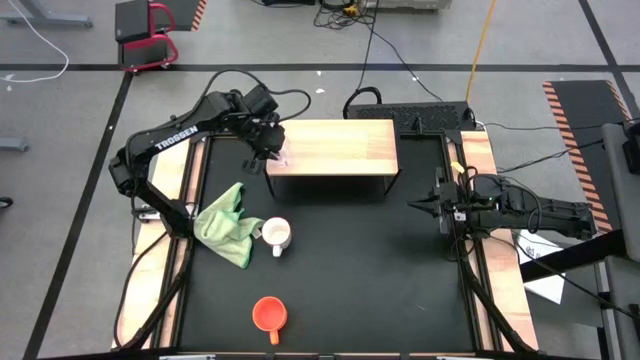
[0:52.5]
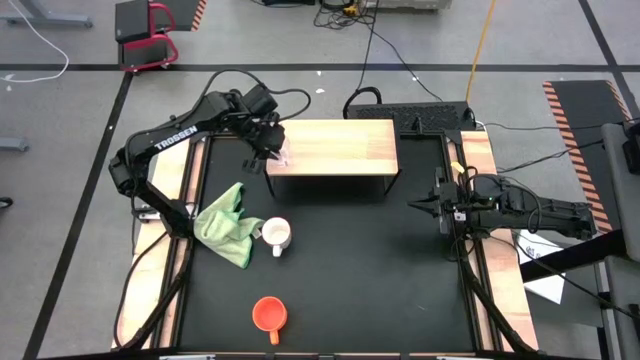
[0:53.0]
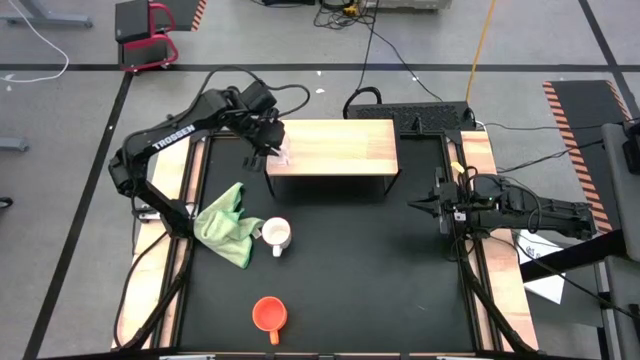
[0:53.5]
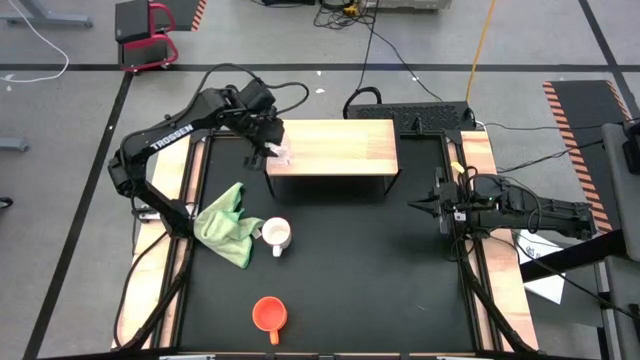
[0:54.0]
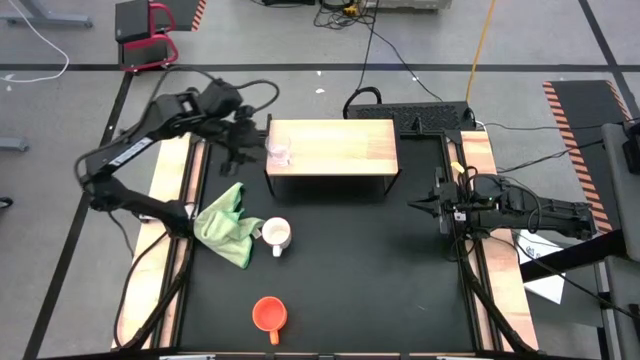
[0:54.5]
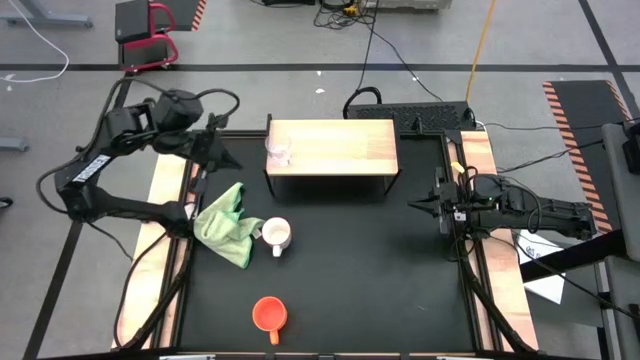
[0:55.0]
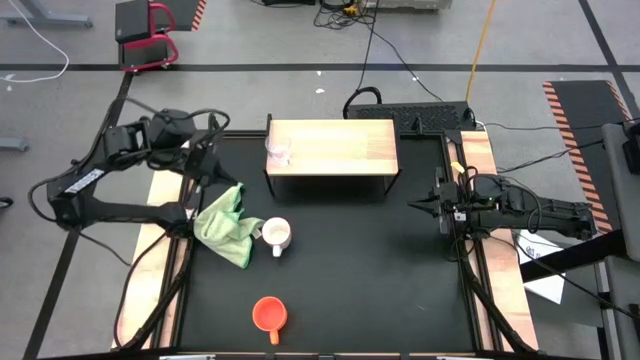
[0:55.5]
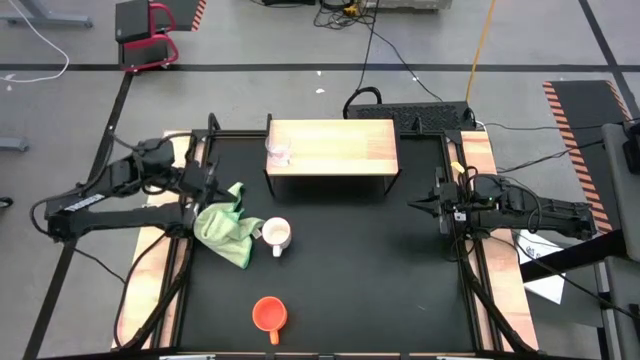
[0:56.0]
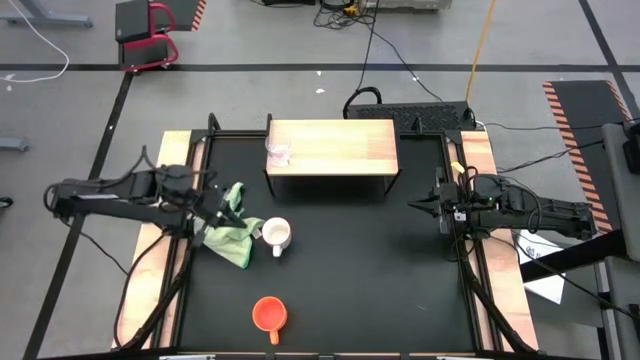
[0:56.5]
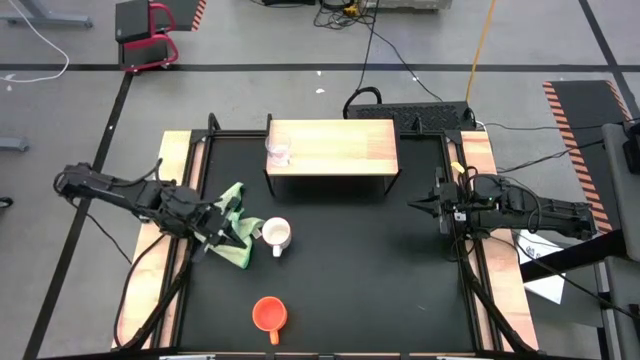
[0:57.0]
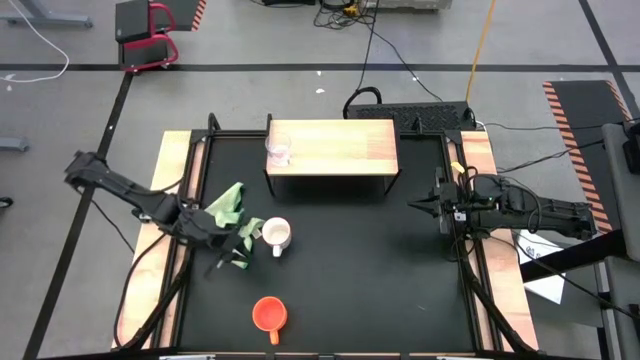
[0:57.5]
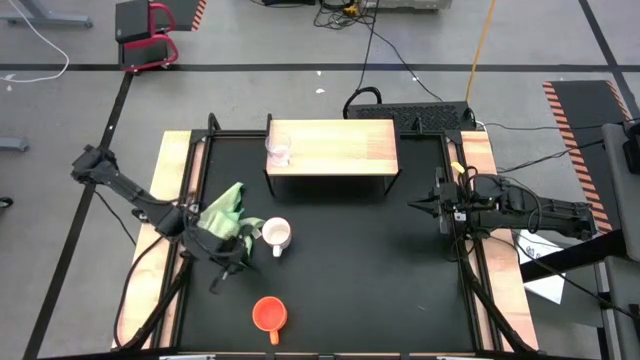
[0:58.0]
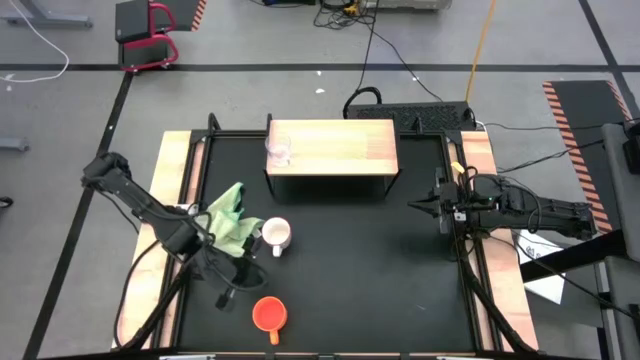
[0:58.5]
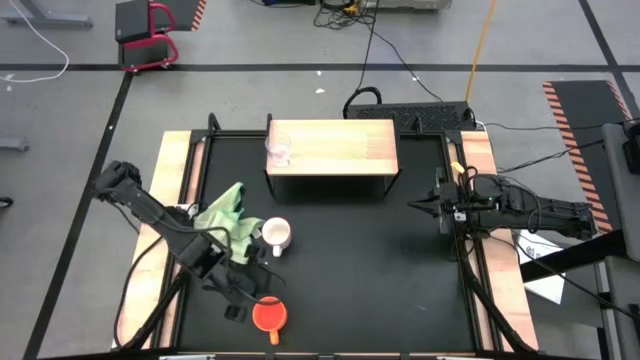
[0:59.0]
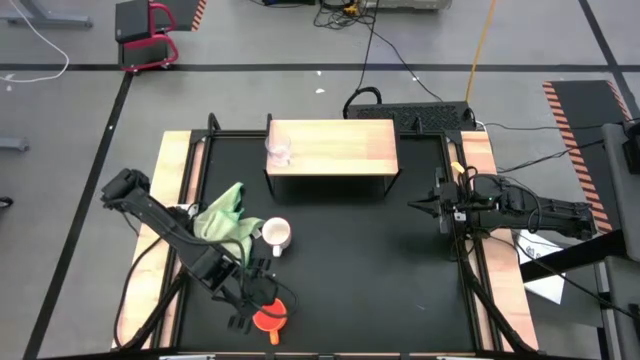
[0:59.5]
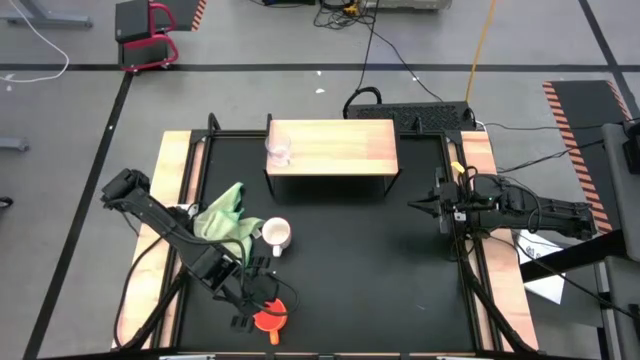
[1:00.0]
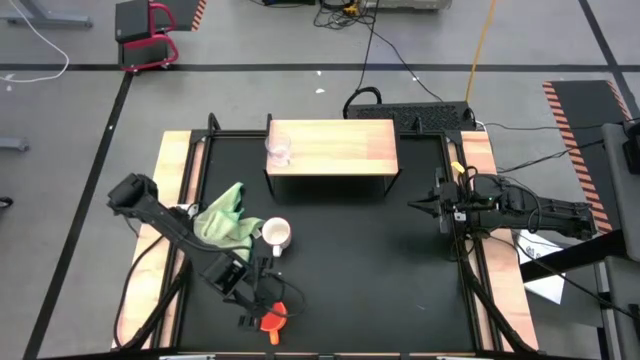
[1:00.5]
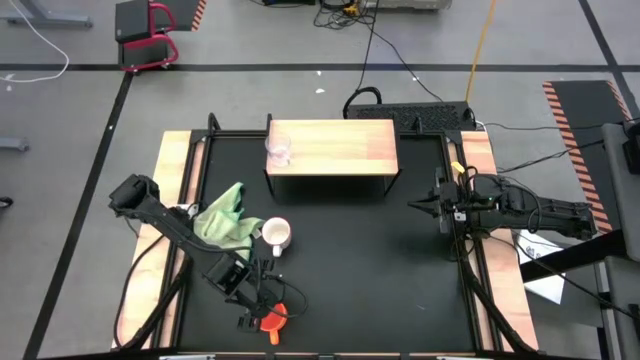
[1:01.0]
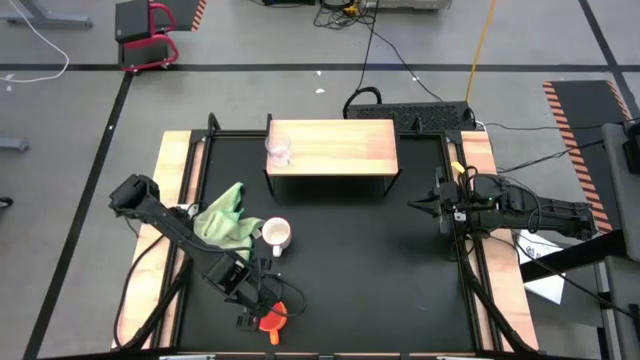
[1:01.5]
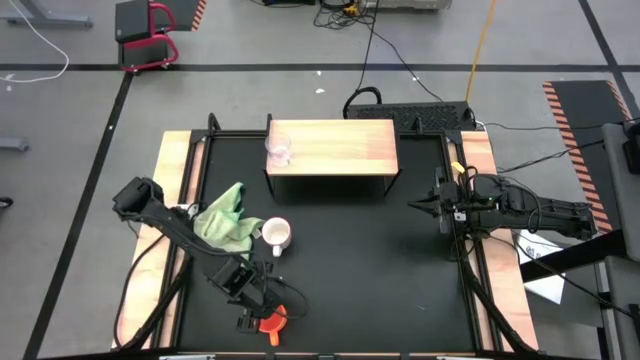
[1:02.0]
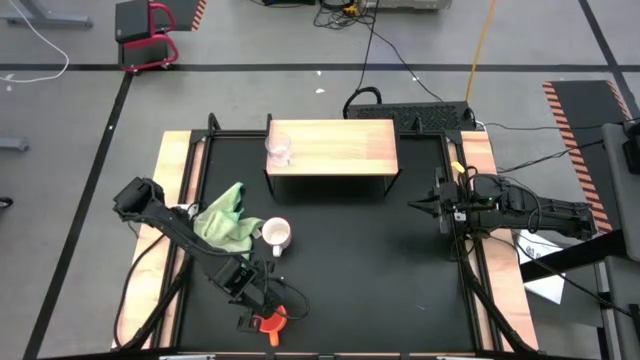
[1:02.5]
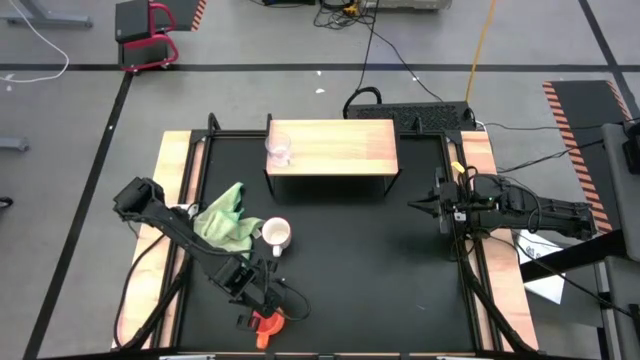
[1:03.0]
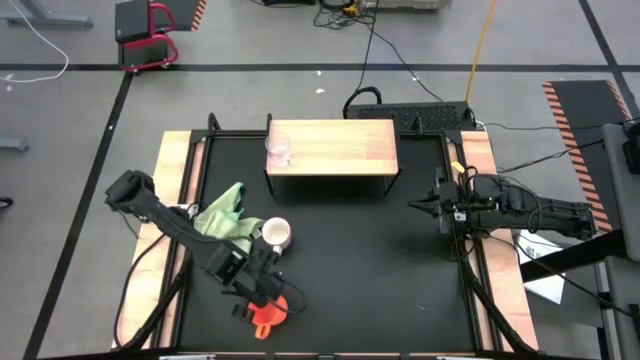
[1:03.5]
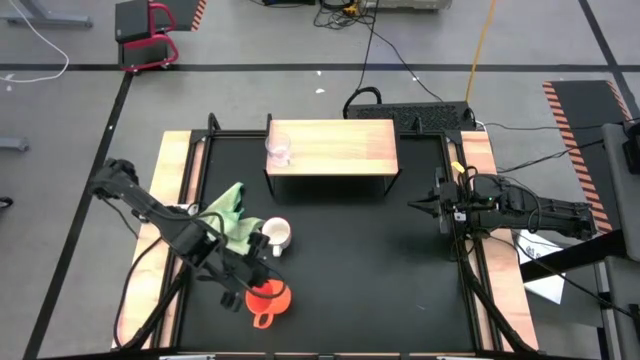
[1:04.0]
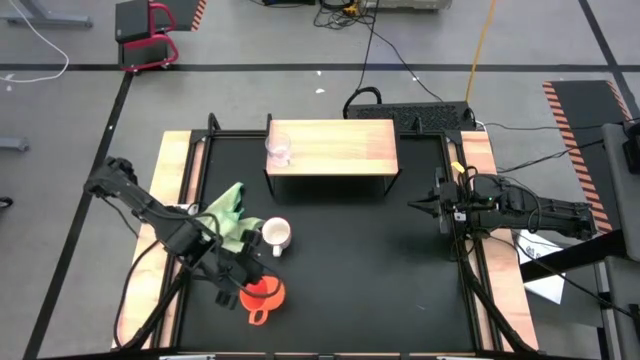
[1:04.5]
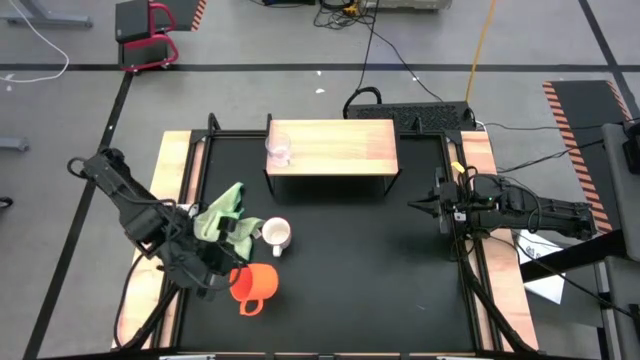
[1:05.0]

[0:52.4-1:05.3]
Task: Stack small to large cups/mugs on shelf
Put the orange mug on the shelf

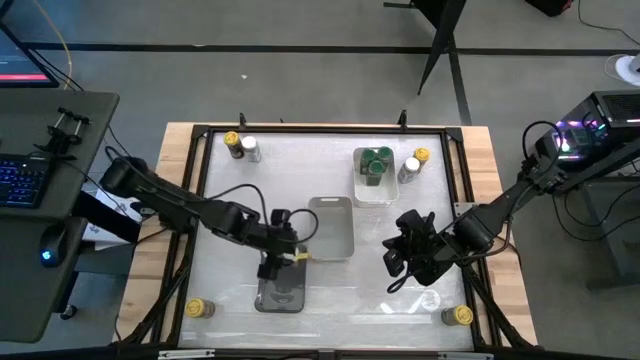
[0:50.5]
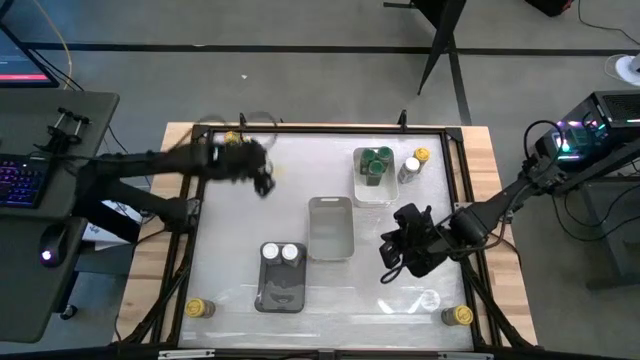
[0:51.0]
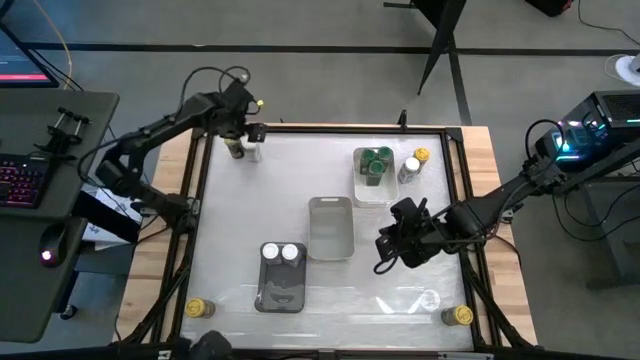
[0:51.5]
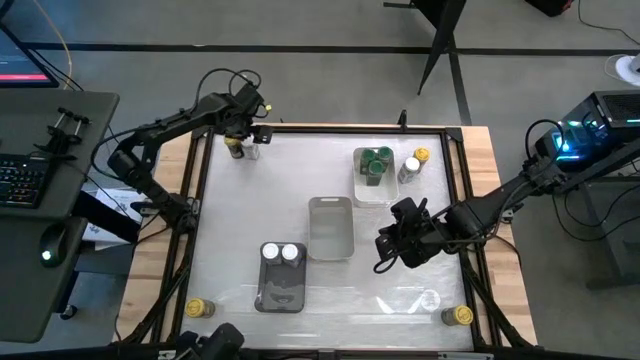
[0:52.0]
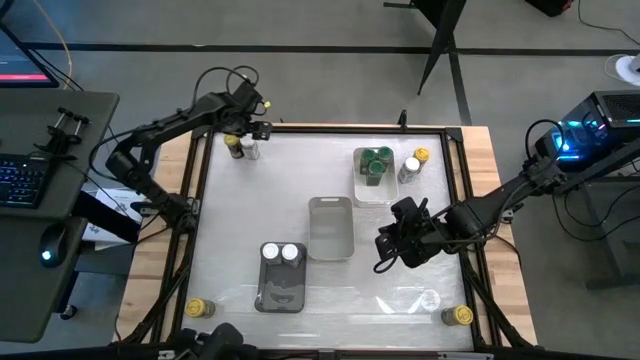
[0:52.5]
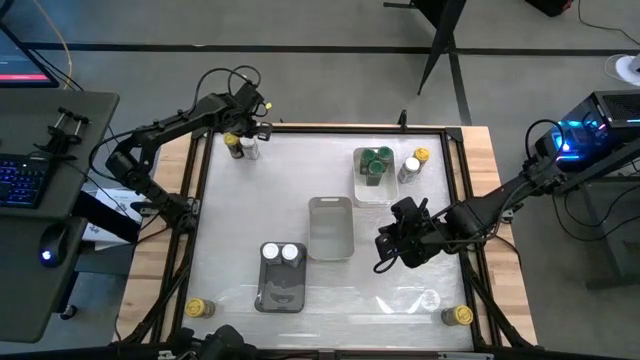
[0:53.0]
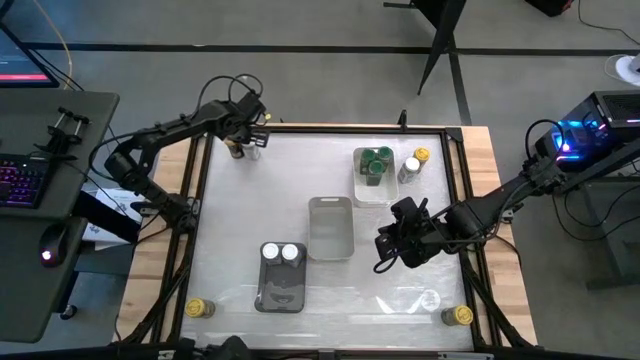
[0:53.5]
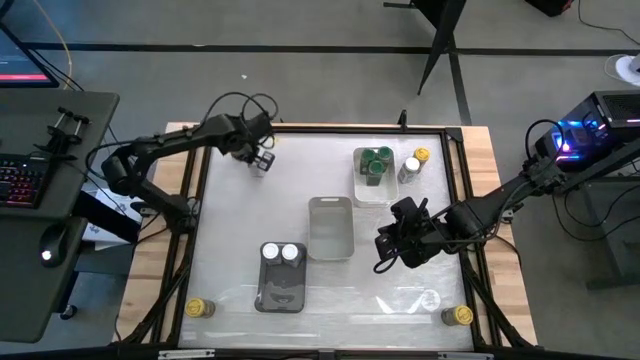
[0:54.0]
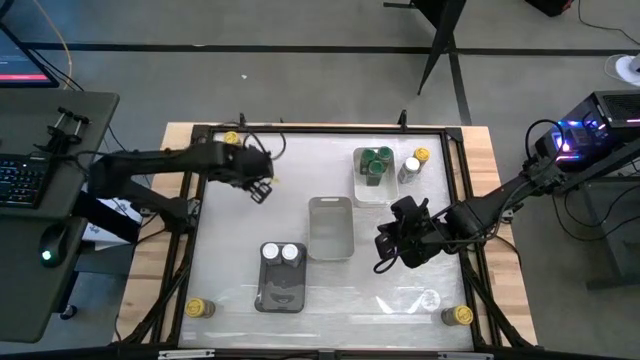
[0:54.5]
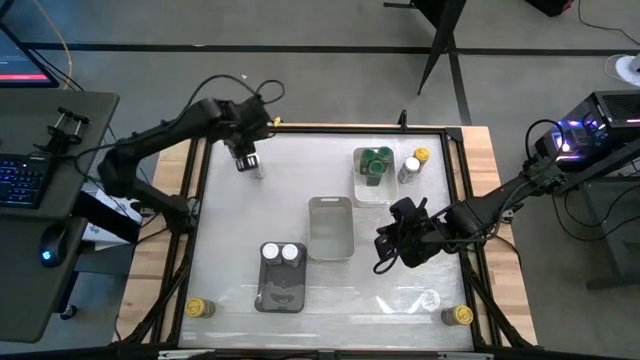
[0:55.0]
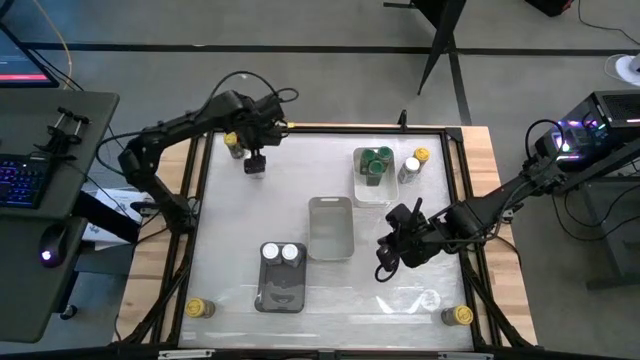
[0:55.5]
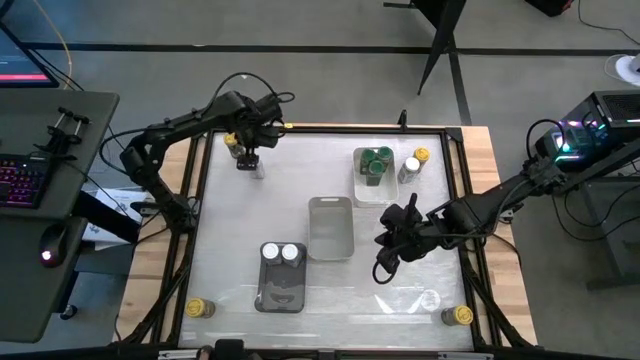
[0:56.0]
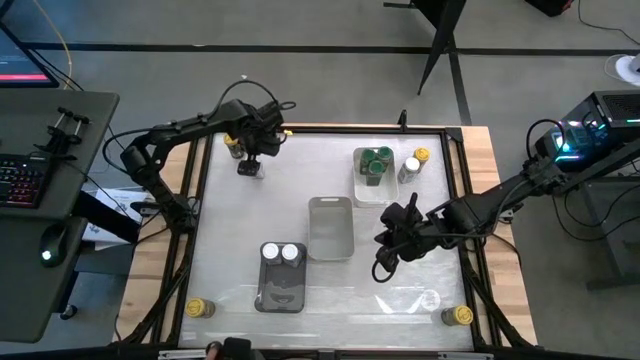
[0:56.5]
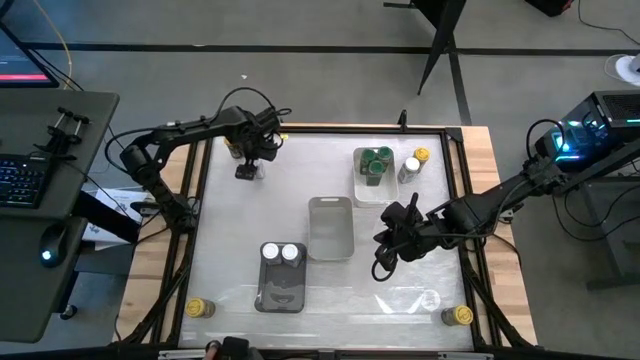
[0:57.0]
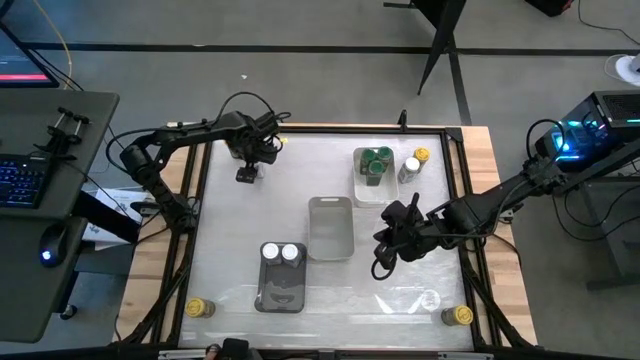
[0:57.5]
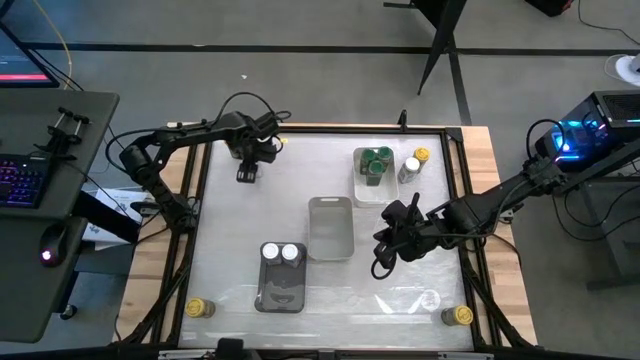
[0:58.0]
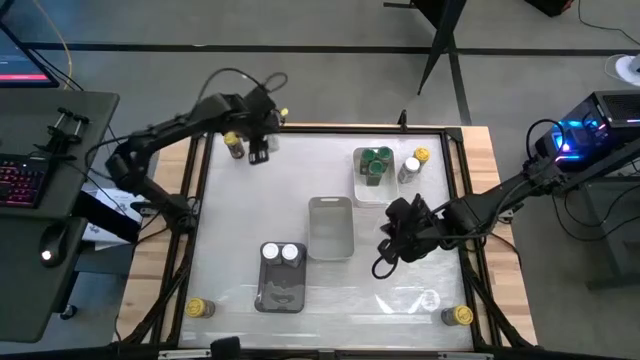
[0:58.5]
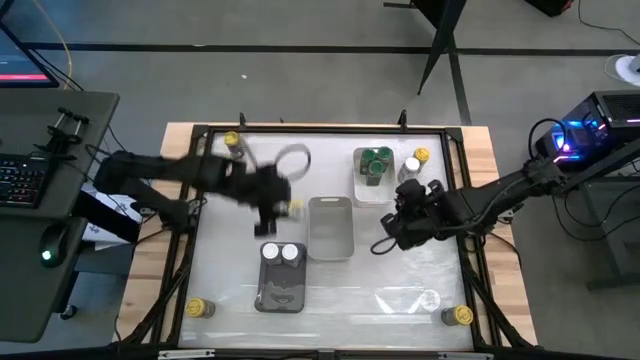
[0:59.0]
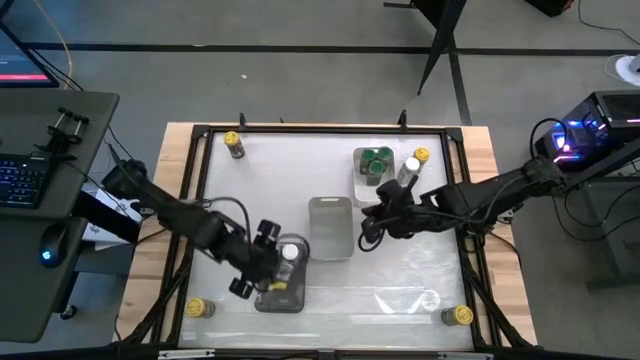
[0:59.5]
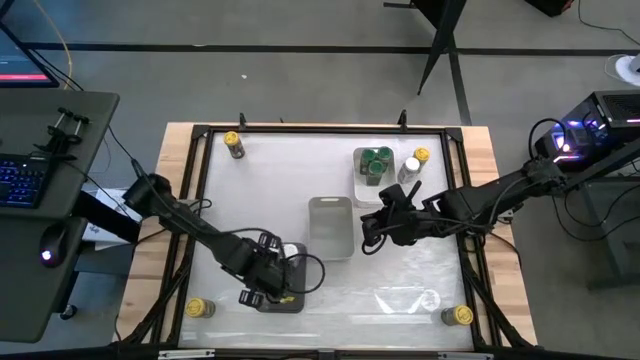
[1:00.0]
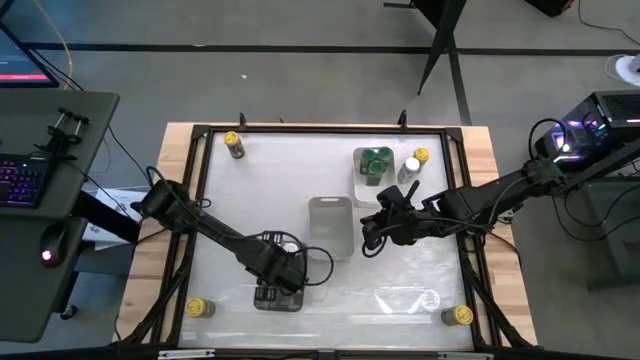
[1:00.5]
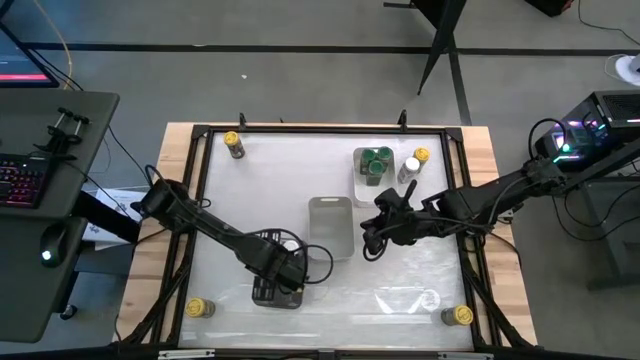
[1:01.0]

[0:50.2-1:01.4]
Task: Sort spices by type
Put the white seasoning bottle into the black bin
